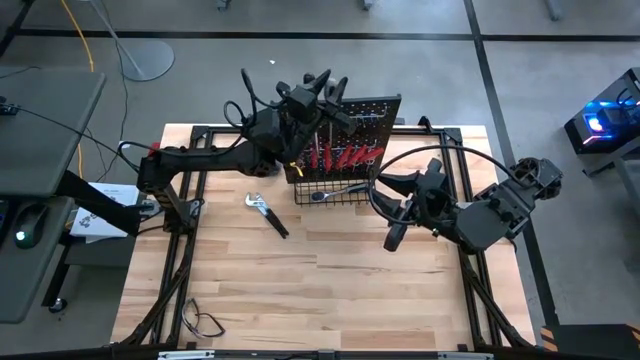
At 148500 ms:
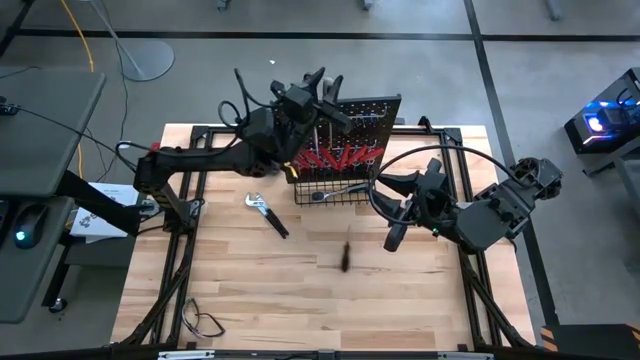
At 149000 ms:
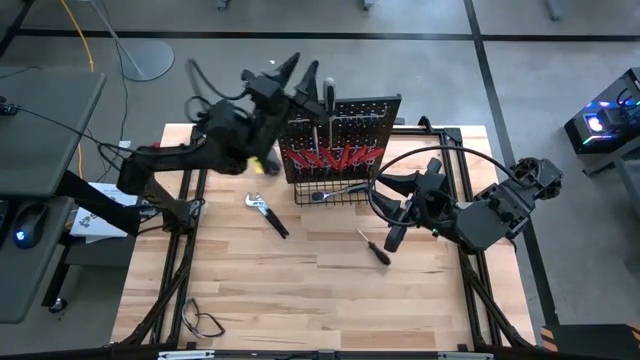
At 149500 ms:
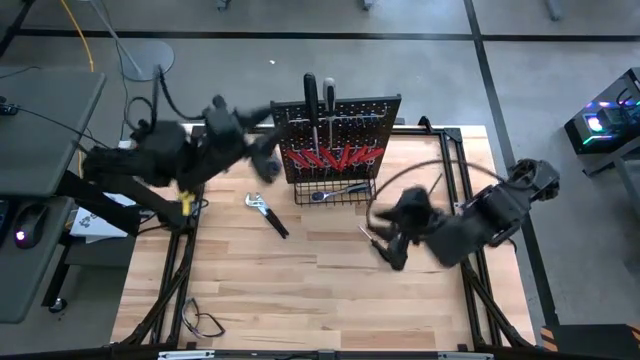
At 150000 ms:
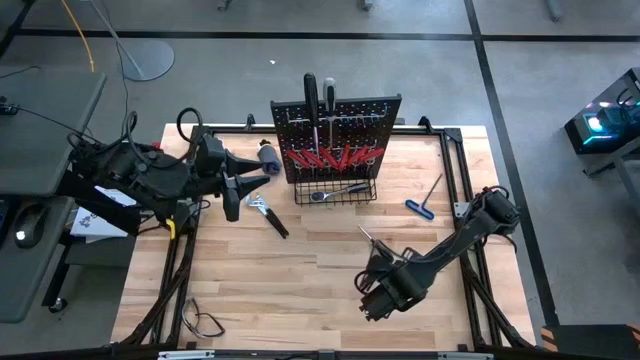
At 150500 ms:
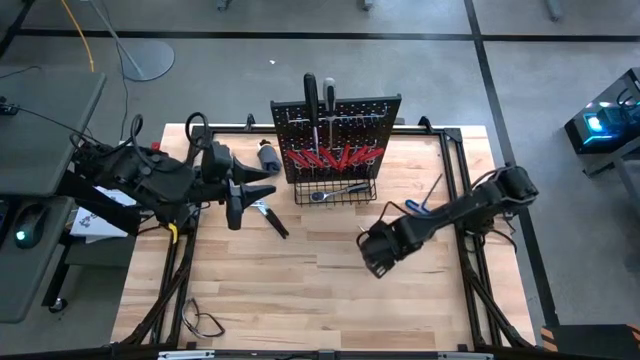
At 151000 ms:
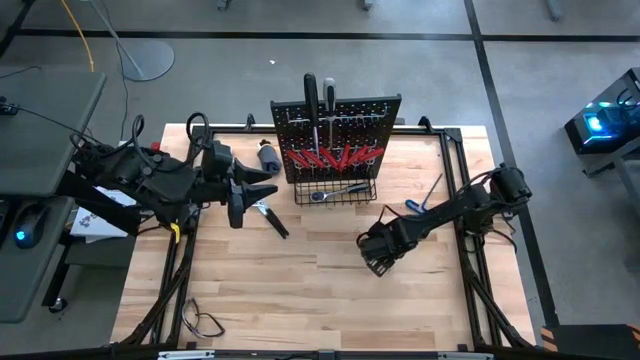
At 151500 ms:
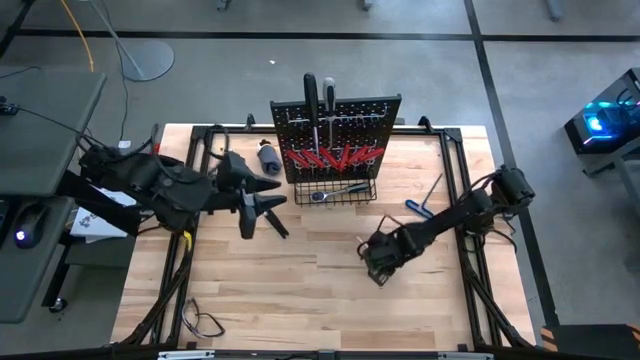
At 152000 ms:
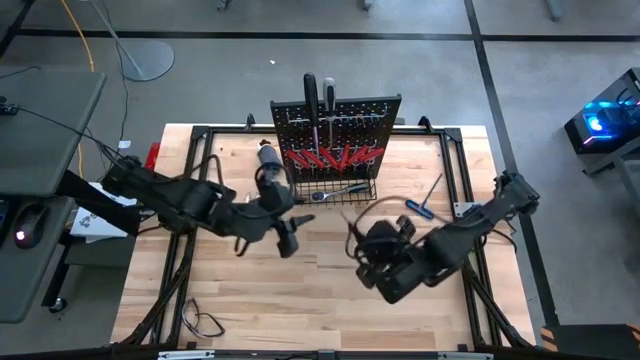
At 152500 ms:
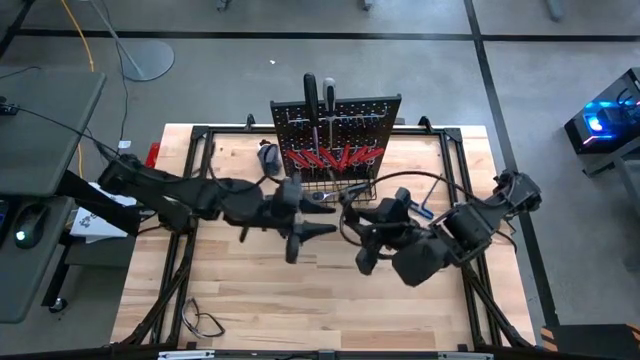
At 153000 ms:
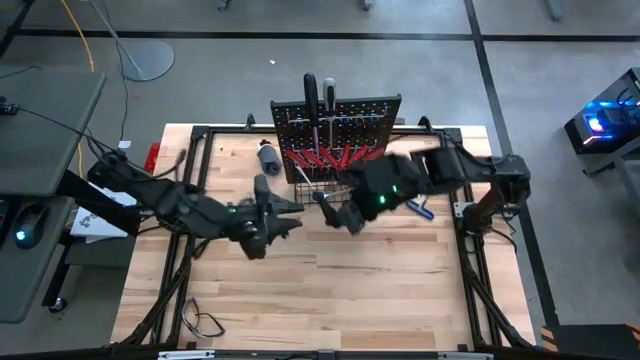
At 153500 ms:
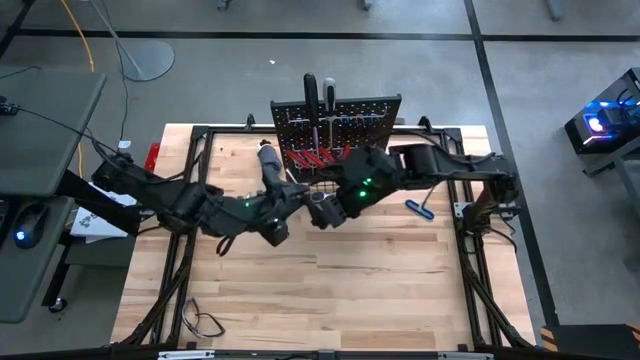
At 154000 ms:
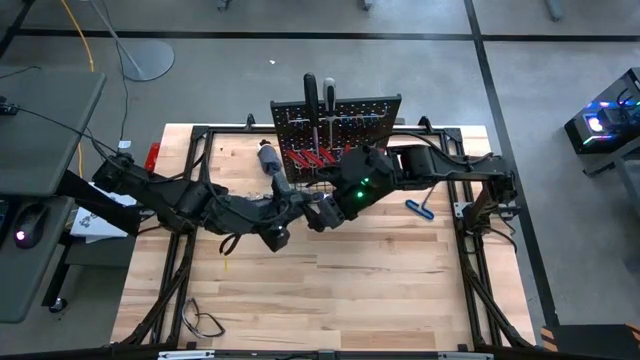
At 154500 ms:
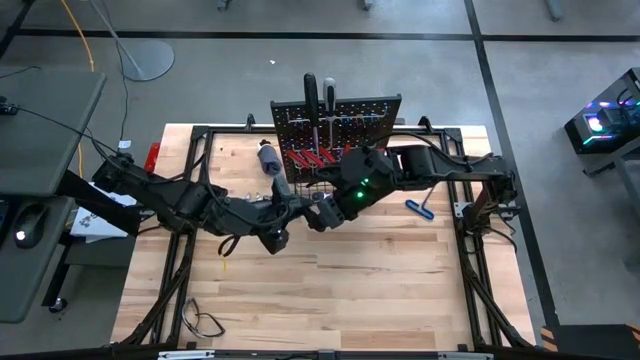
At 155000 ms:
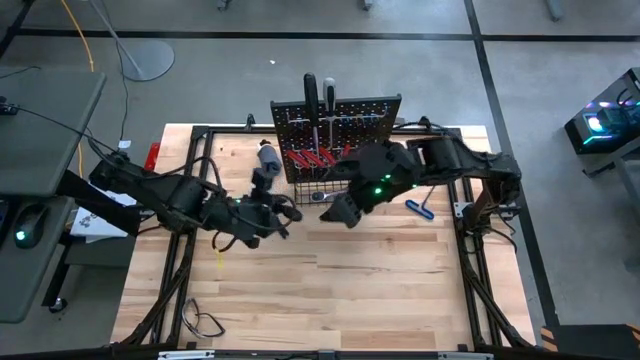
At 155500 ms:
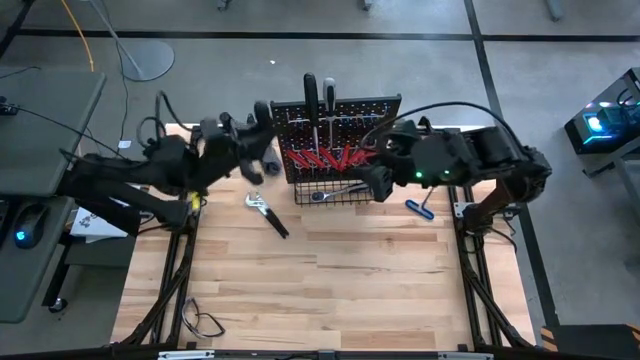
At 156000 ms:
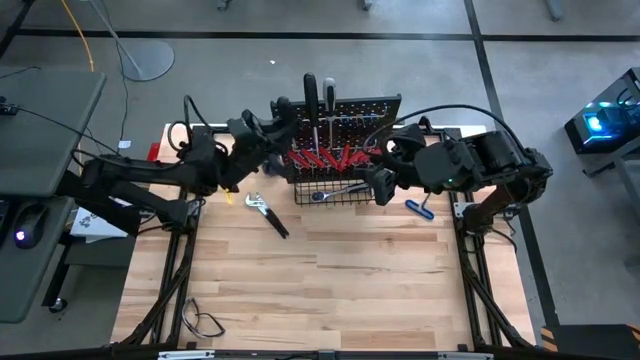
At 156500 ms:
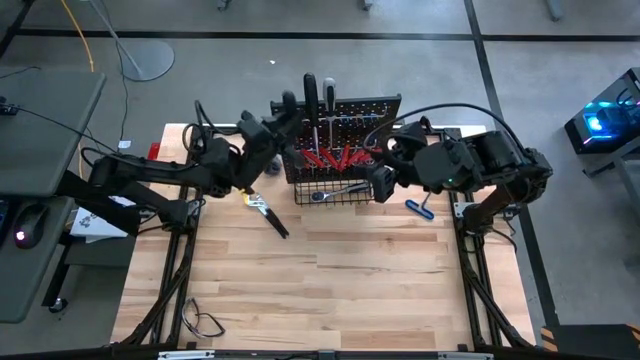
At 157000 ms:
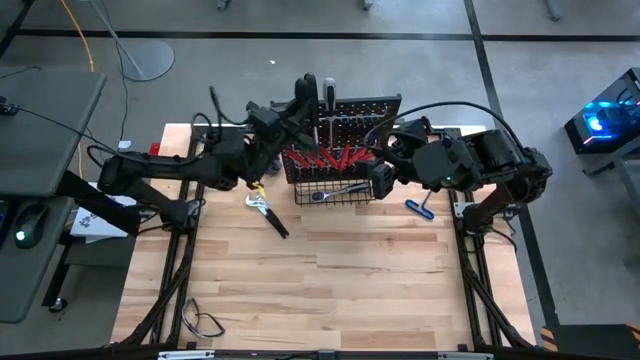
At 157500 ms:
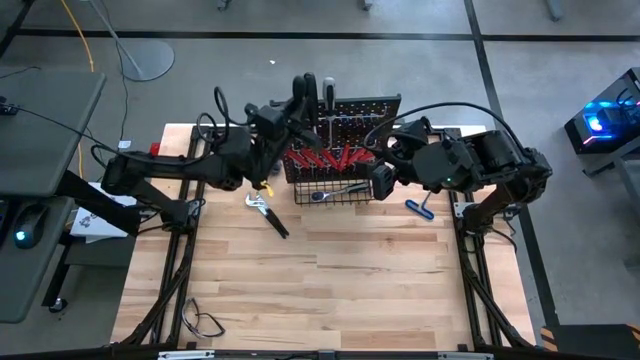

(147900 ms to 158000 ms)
Task: Hang tools onto peg board
Hang the black screwdriver on the peg board

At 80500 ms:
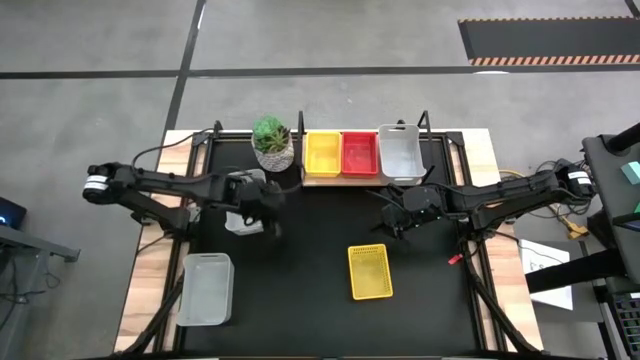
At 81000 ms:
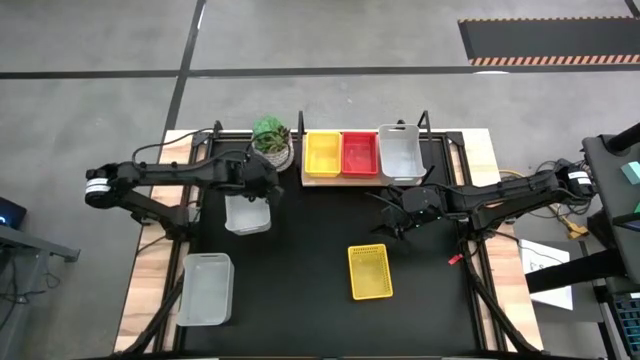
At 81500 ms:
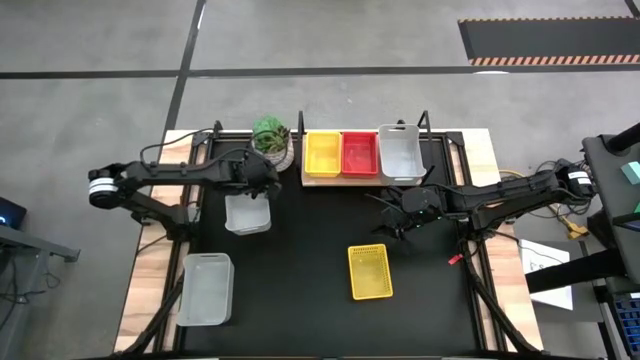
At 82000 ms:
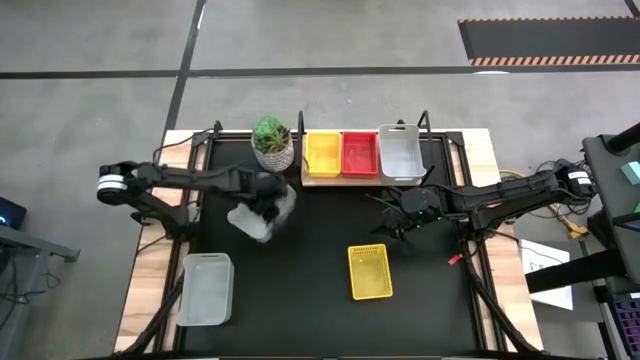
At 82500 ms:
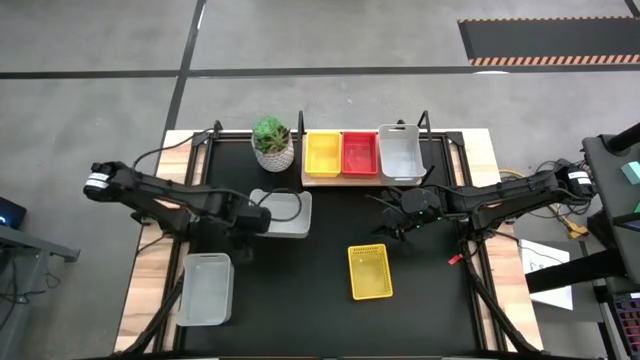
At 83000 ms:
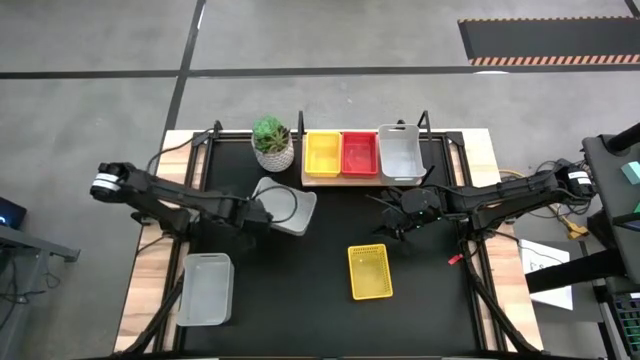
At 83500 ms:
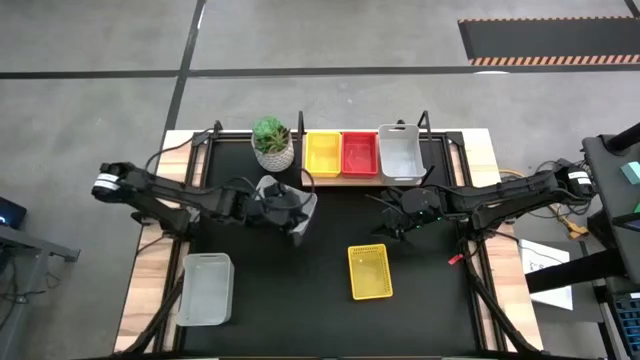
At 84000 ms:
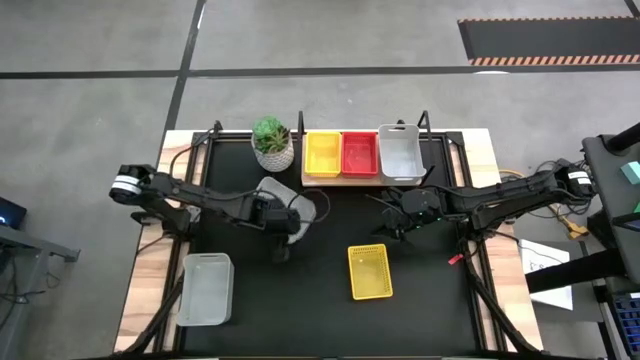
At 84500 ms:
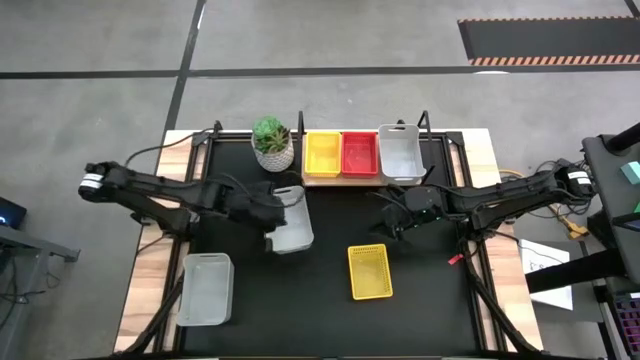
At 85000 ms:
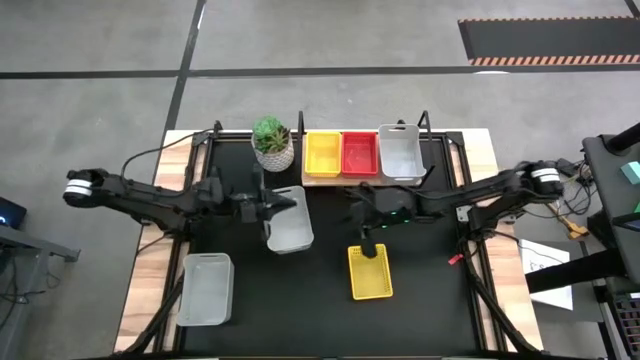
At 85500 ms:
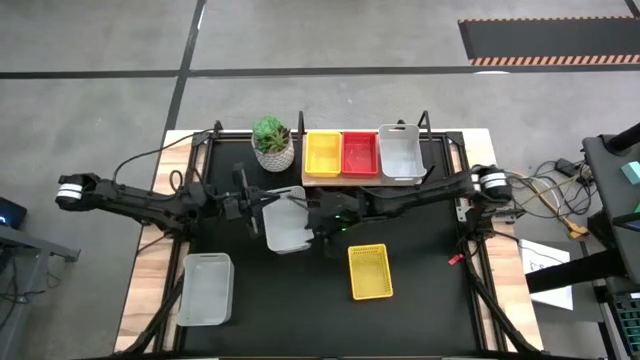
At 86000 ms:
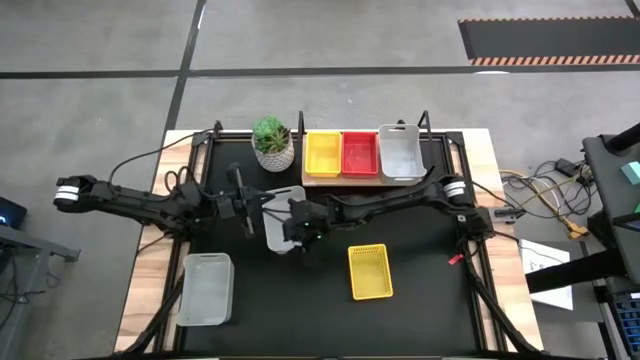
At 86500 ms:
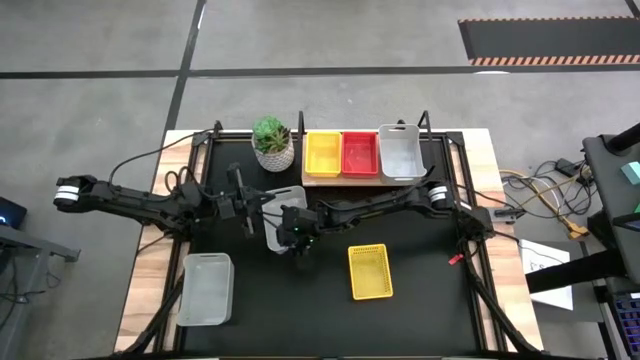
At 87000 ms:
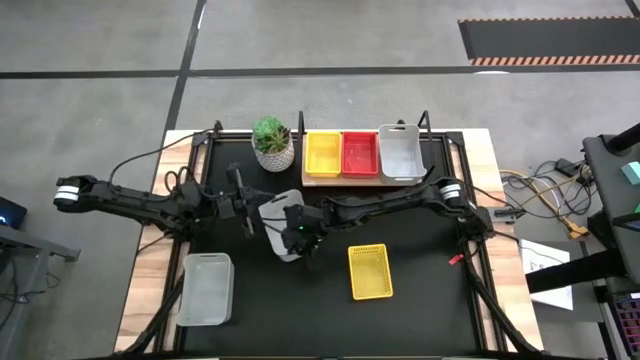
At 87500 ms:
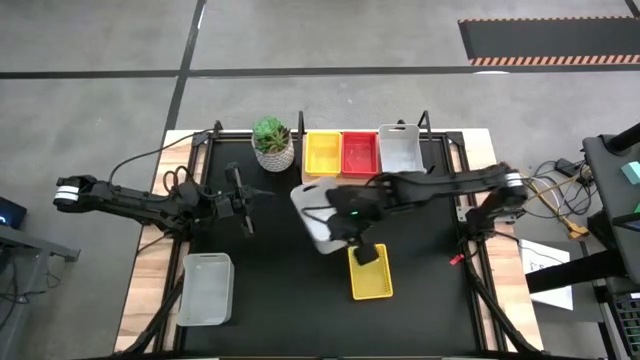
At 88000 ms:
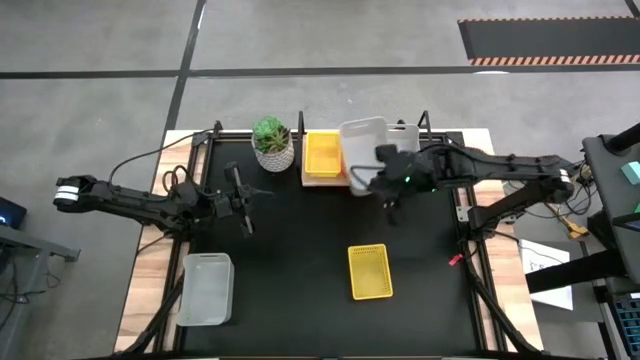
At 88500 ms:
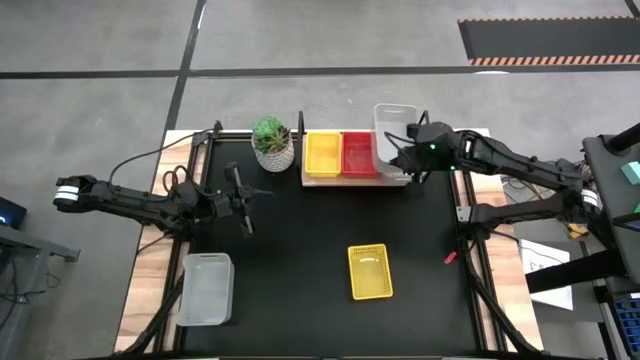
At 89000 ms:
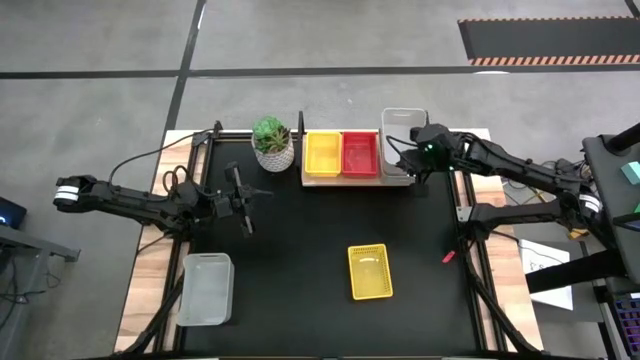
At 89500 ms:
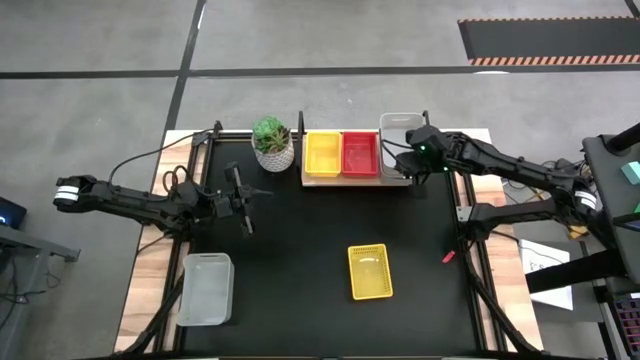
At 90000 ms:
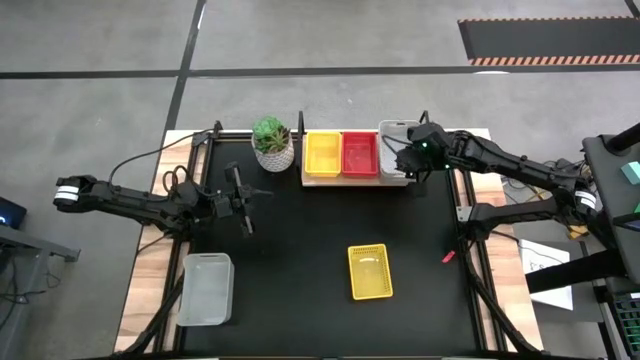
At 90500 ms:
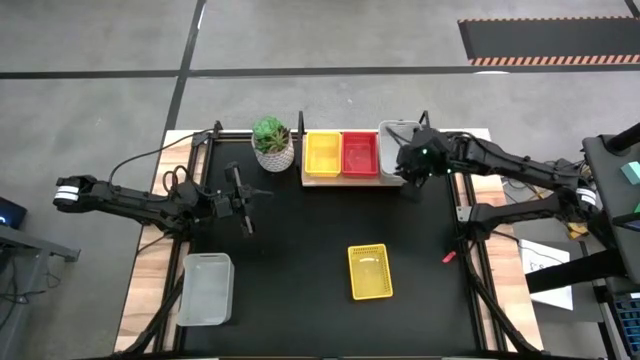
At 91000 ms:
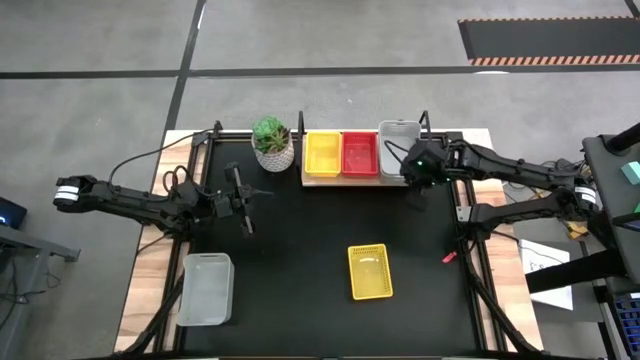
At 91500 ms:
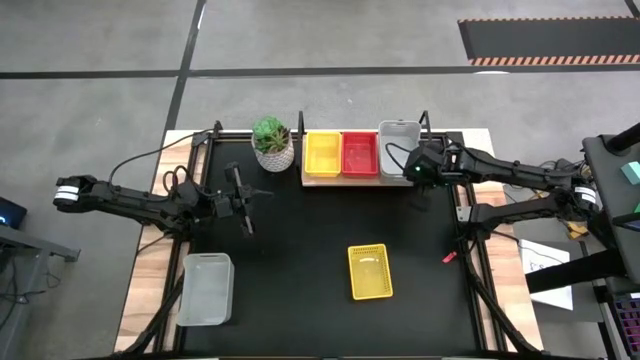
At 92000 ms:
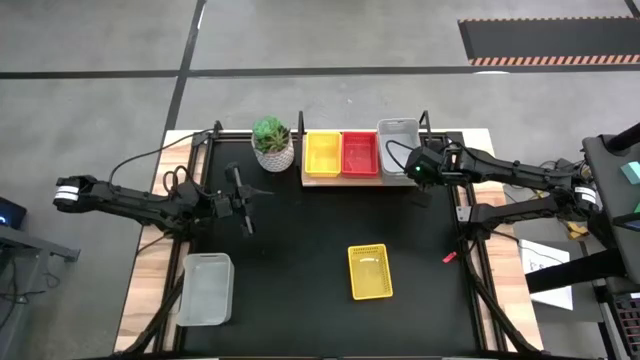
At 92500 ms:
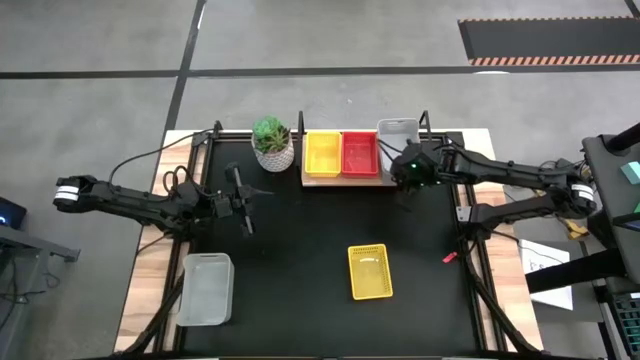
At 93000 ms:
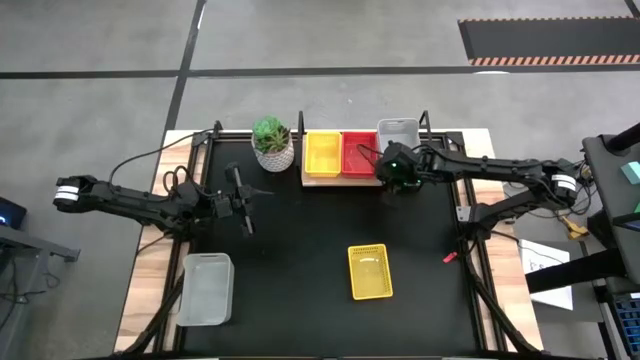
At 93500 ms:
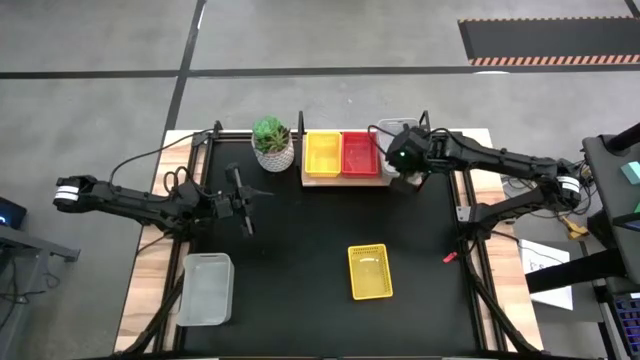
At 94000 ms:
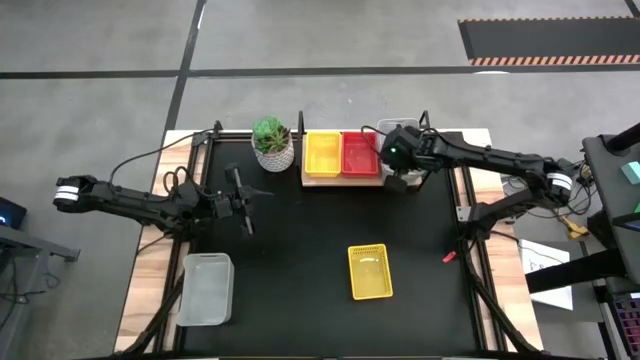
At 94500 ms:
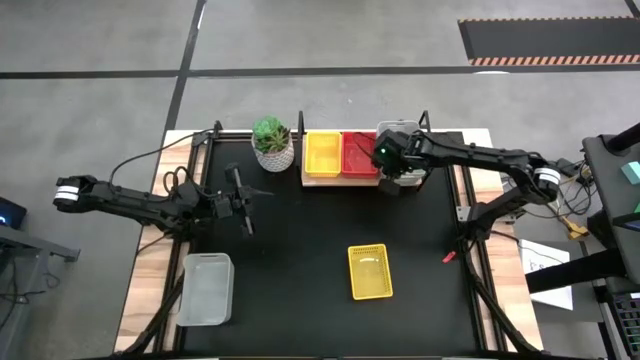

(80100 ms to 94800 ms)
Task: Stack baskets on shelf by color
Stack the top gray bin on top of the gray bin
